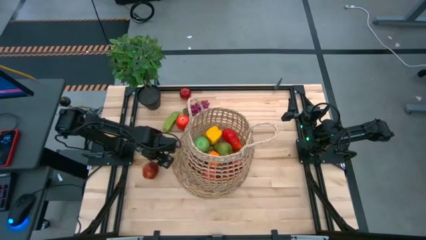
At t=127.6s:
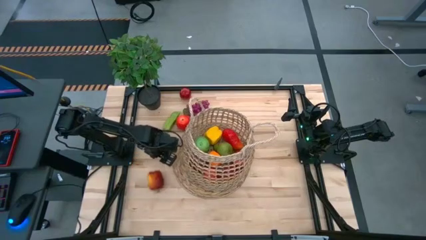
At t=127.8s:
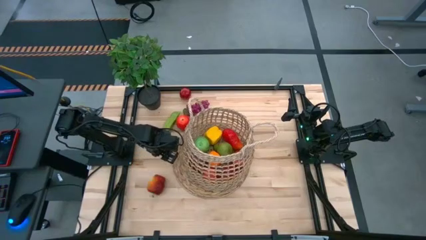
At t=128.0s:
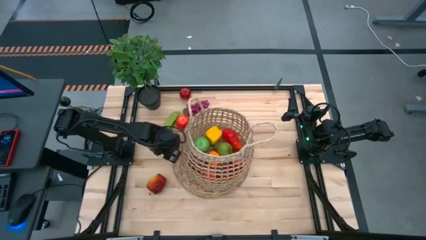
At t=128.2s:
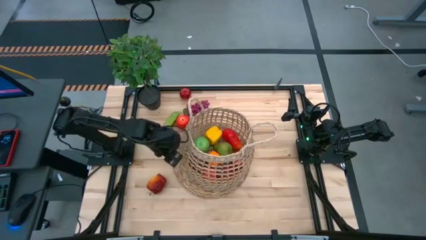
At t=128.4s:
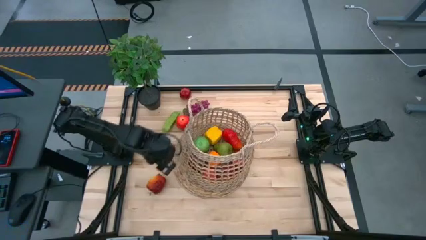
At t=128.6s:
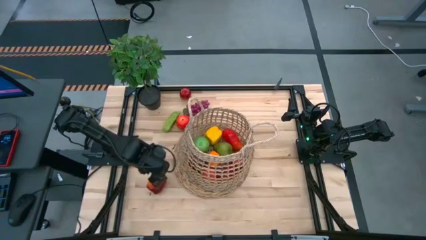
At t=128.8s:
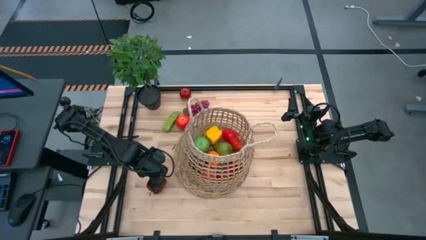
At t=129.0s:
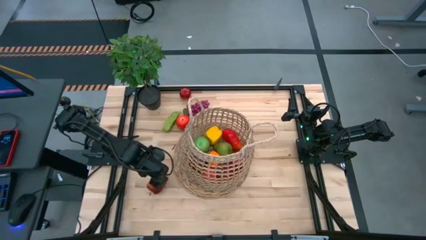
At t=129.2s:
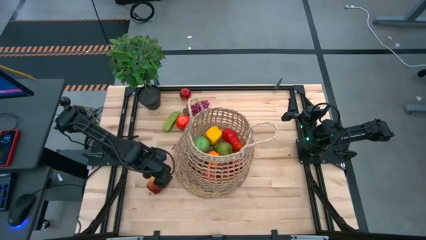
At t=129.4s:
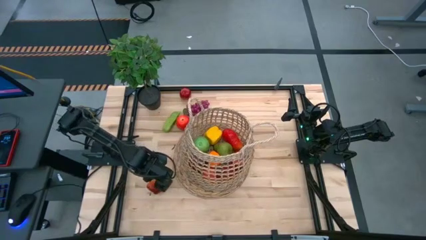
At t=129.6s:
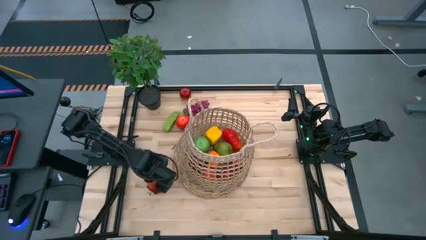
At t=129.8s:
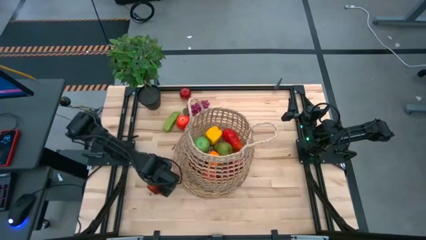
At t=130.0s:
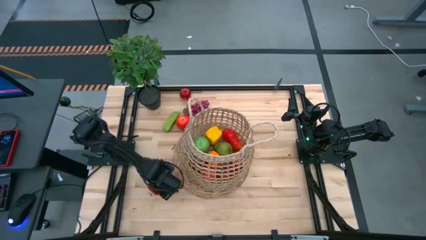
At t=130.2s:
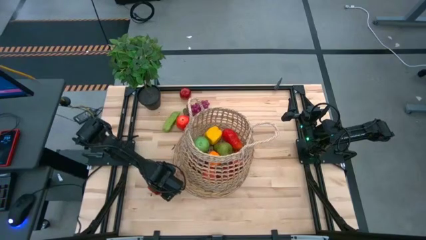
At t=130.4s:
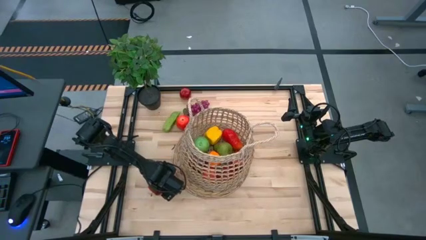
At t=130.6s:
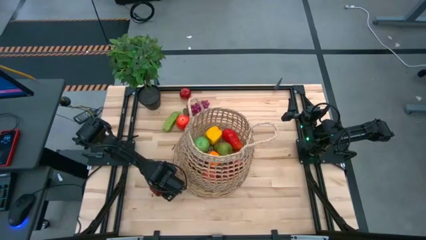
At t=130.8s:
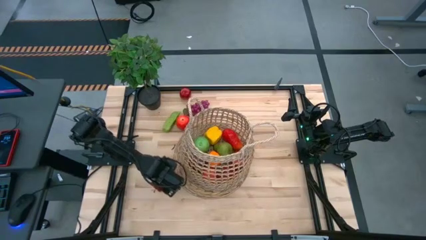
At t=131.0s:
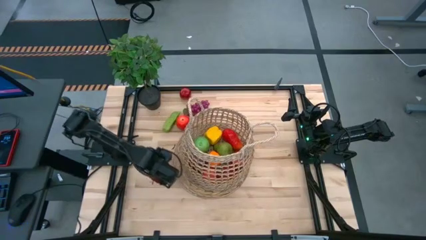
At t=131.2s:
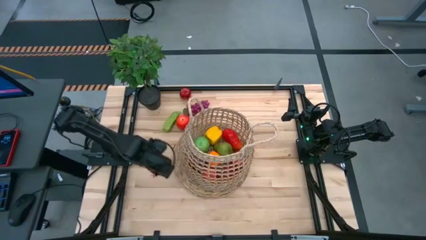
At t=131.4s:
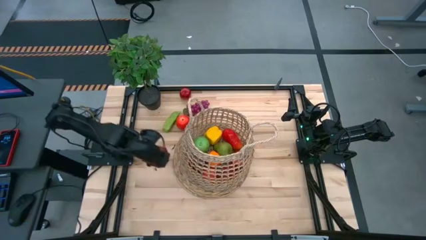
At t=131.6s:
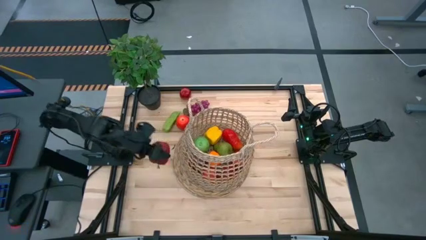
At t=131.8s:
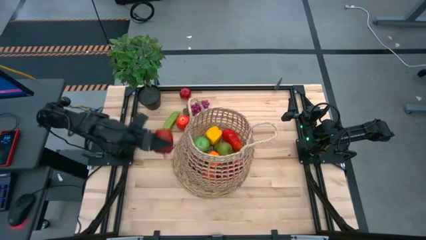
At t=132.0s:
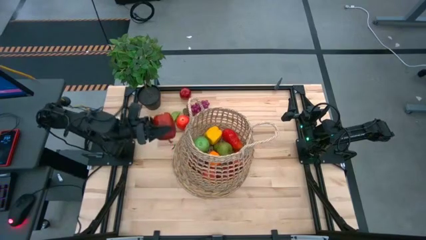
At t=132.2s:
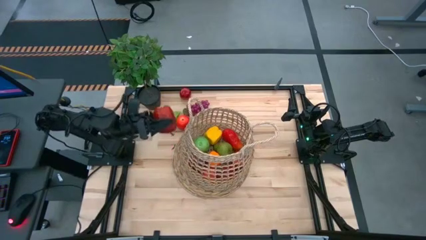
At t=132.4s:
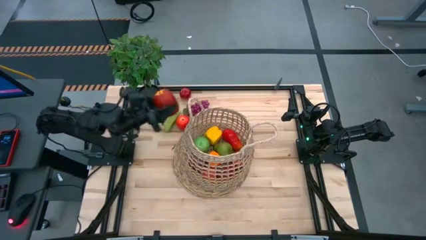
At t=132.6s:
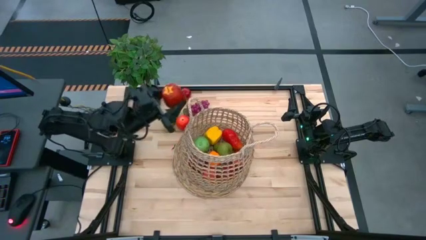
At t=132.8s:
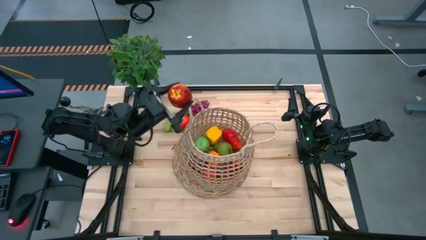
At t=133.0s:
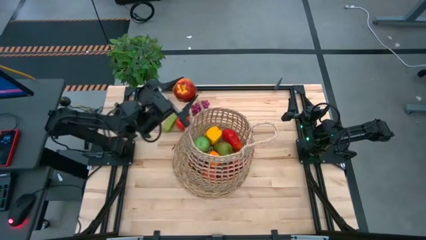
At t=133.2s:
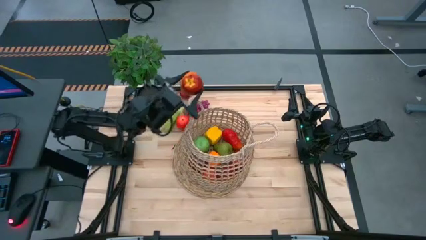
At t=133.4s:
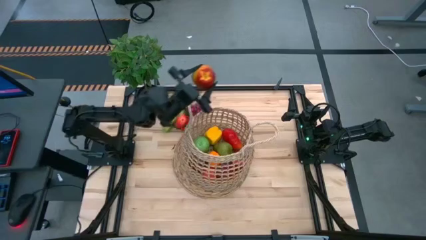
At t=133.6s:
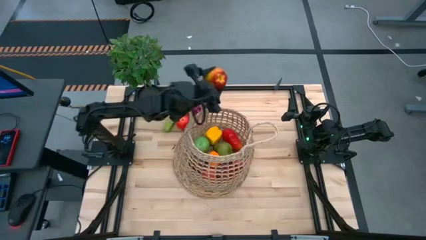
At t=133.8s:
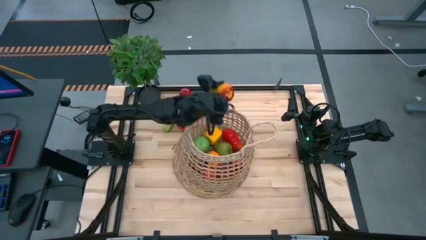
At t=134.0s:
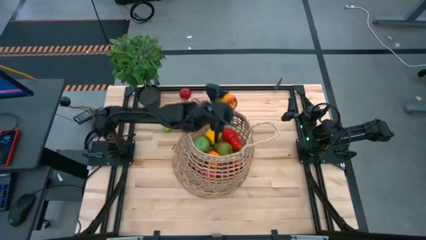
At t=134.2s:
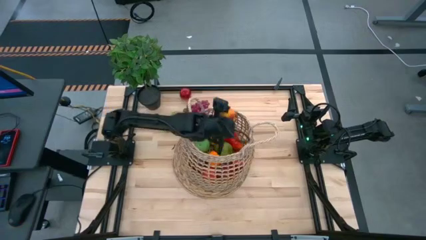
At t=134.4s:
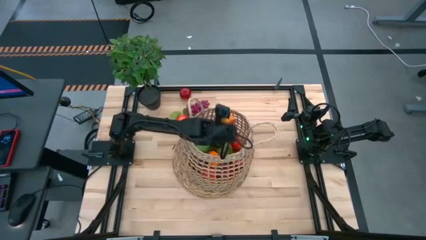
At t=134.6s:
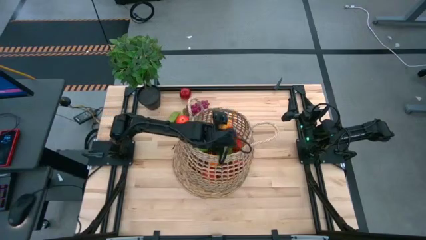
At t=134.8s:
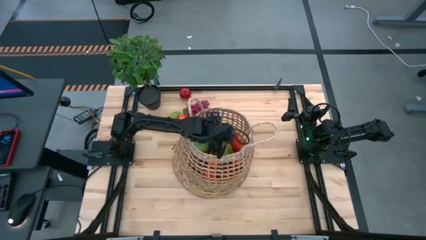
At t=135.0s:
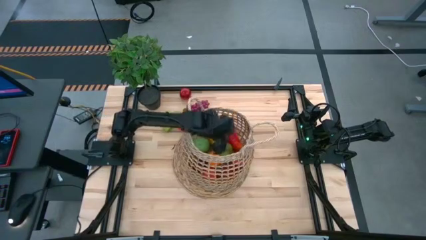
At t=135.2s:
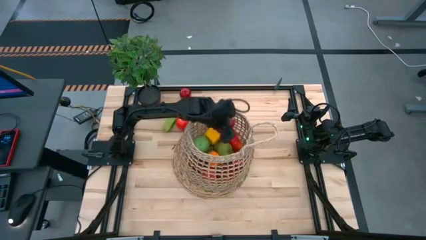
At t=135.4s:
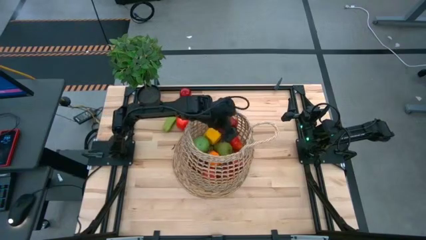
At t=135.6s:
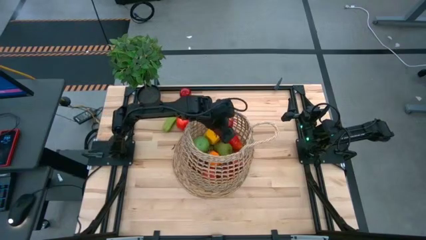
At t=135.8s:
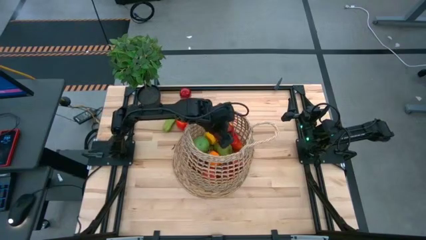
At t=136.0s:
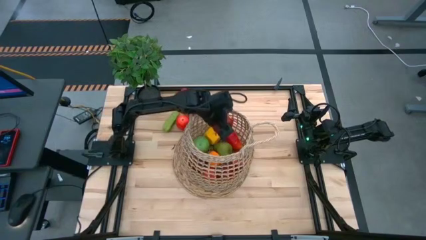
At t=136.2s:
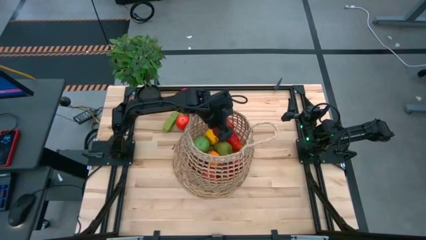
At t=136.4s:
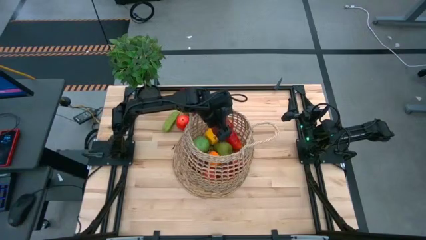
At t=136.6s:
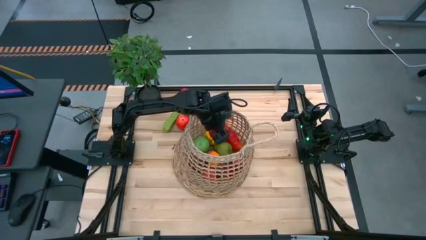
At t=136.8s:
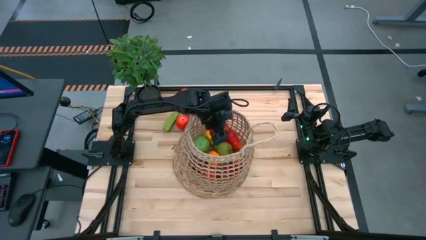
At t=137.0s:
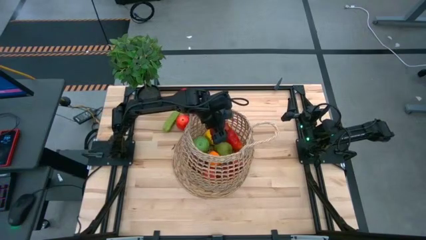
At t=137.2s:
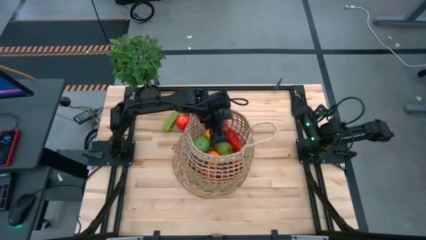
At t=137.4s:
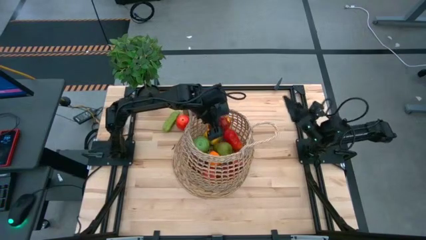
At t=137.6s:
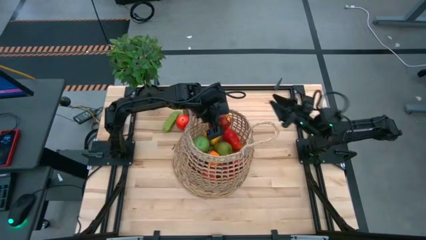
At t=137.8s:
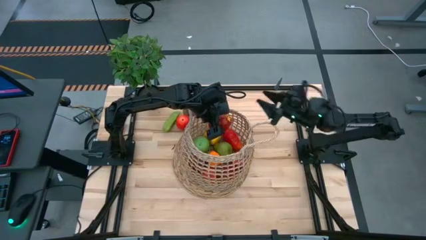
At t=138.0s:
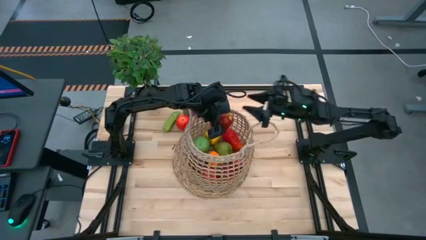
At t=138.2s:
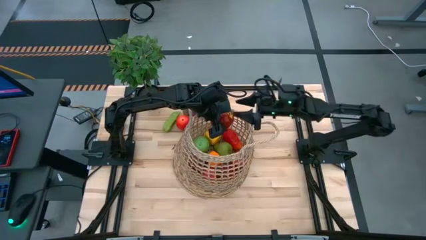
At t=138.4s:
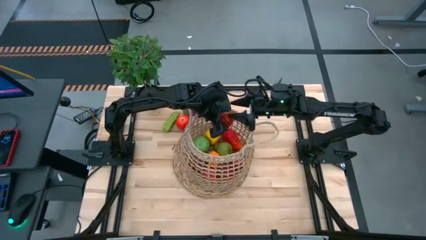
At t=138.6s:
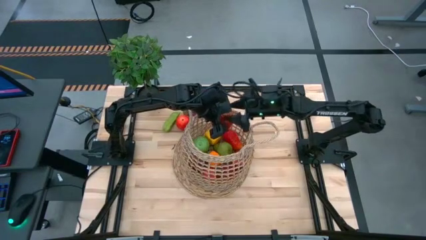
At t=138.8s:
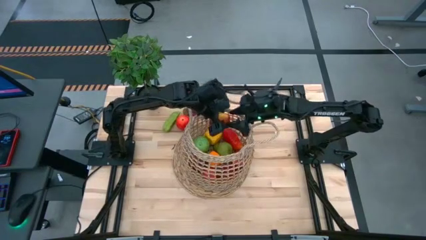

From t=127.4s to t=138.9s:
Task: Build produce basket
Put the red apple into the brown basket

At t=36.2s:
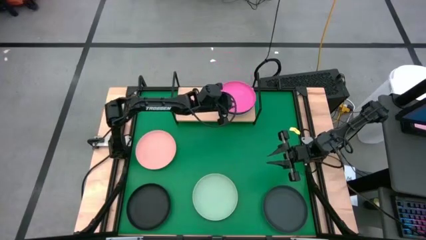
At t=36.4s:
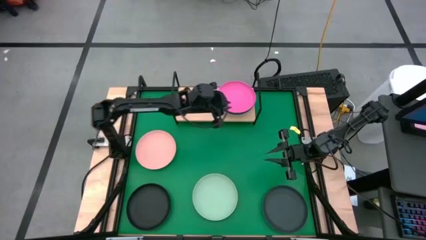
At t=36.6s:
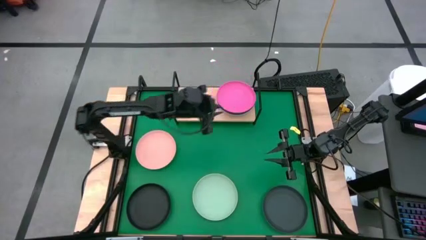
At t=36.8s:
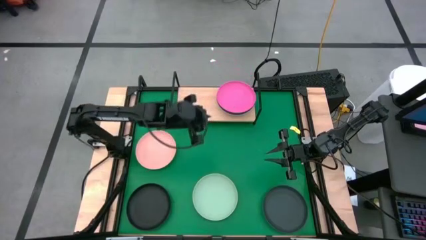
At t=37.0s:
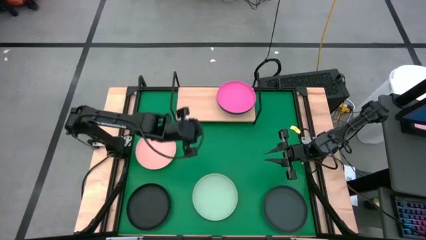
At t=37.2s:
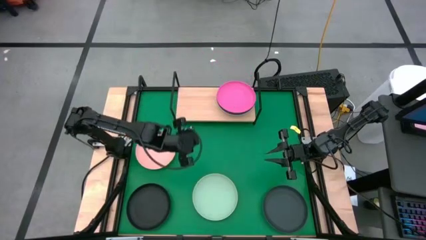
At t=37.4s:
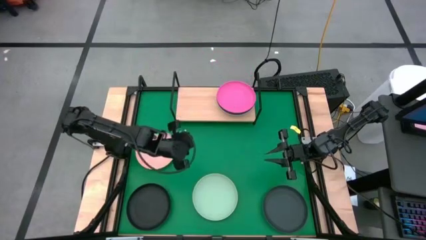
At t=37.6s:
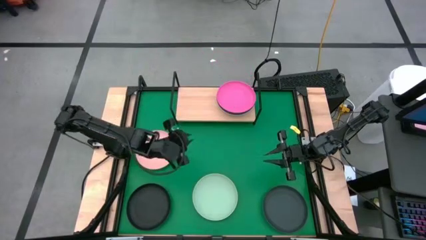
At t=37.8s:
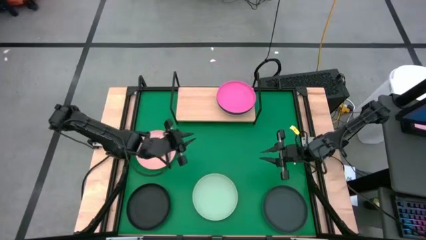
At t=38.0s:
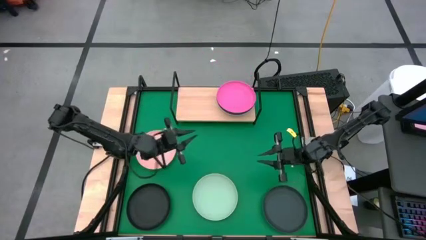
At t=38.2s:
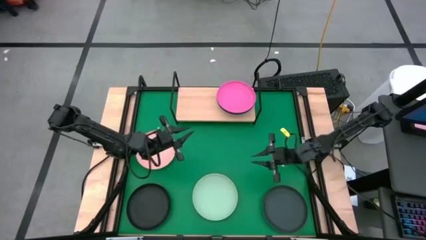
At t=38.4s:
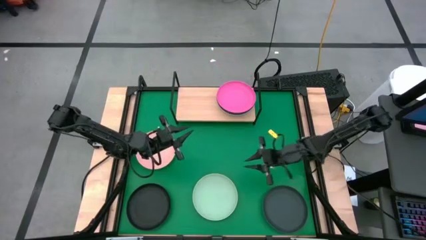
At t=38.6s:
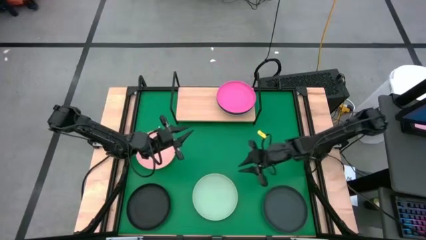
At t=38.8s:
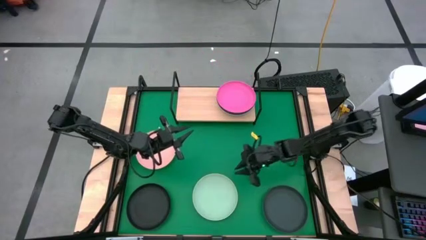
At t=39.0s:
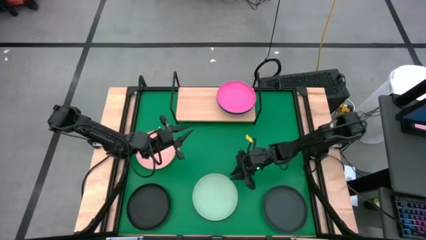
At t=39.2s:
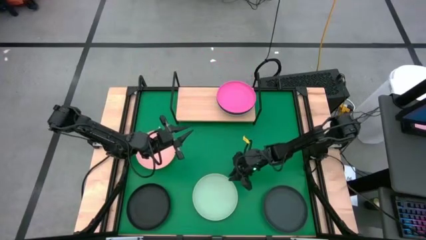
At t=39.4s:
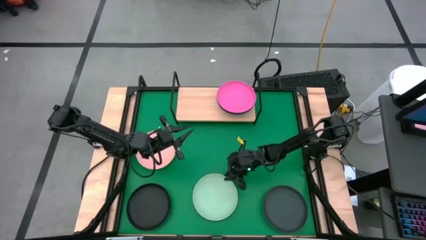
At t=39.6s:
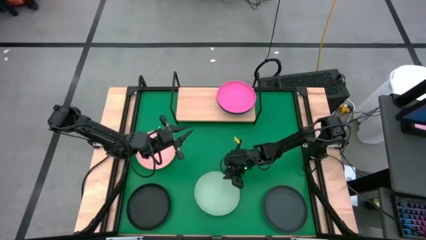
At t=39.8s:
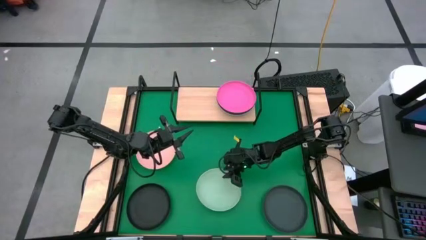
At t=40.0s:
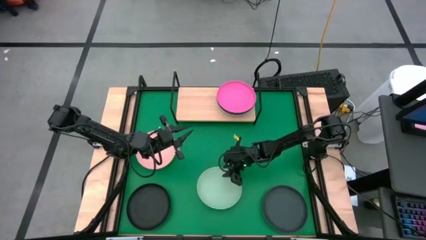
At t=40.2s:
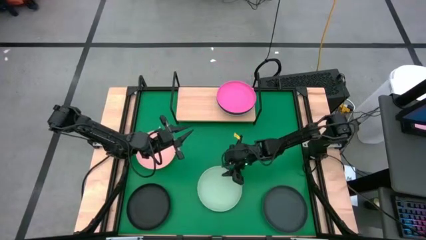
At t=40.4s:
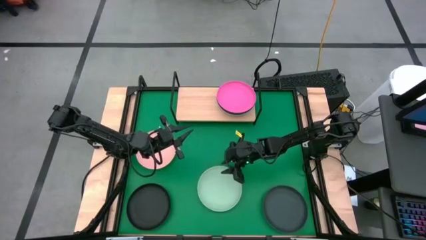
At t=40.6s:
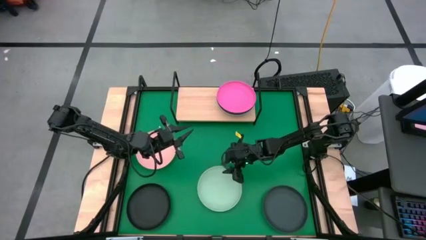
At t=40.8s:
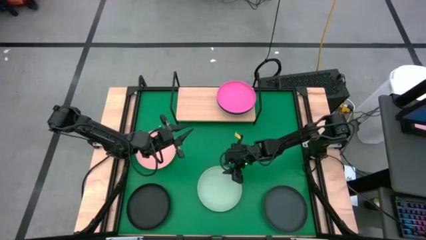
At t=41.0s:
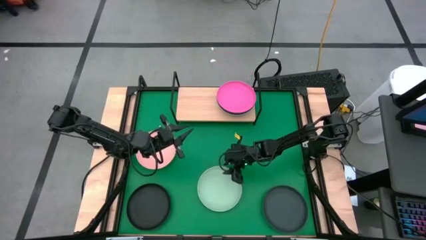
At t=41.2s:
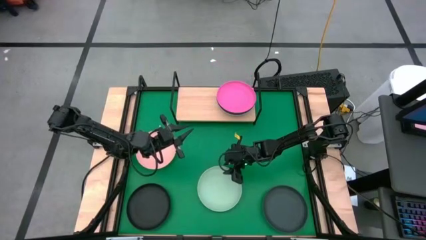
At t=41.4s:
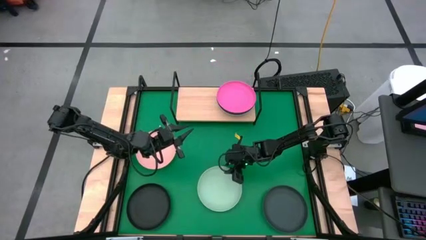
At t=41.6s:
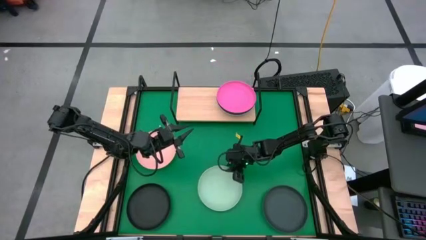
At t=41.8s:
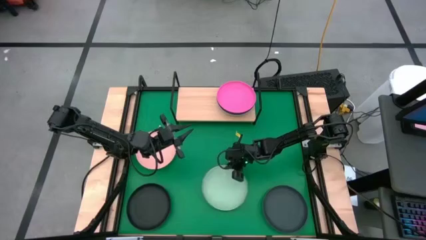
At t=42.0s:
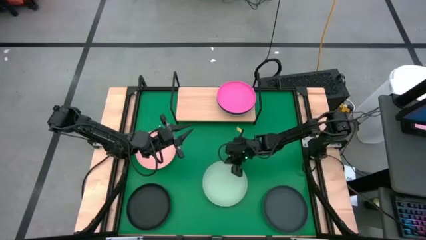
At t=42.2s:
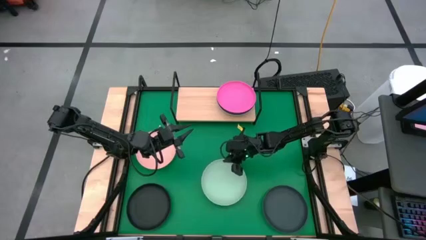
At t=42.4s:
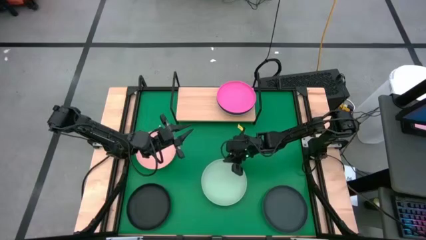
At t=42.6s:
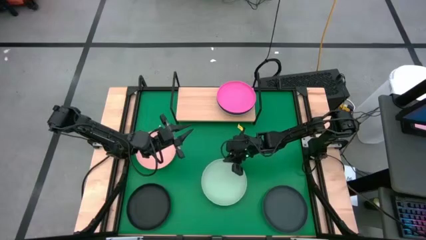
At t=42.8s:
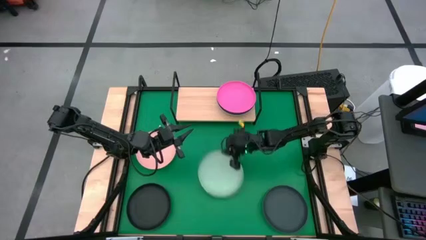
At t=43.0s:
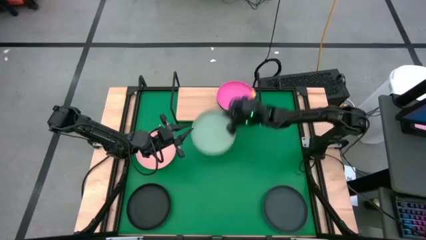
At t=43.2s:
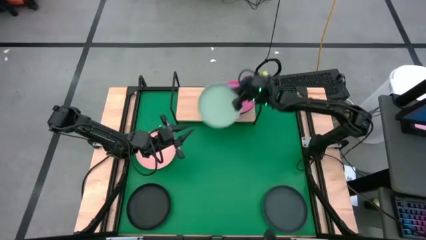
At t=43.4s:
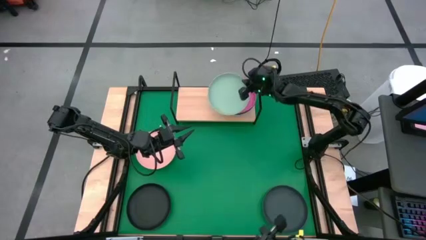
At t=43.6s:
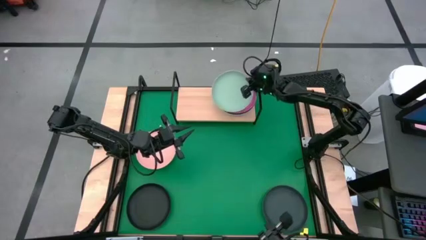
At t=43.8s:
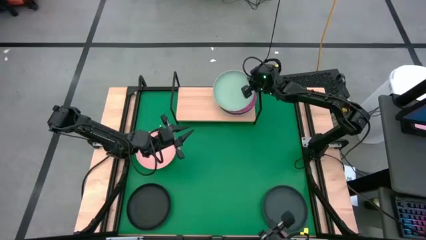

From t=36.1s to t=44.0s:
Task: Place and stack plates onto a shelf
Stack the green plate on top of the pink plate on the shelf
